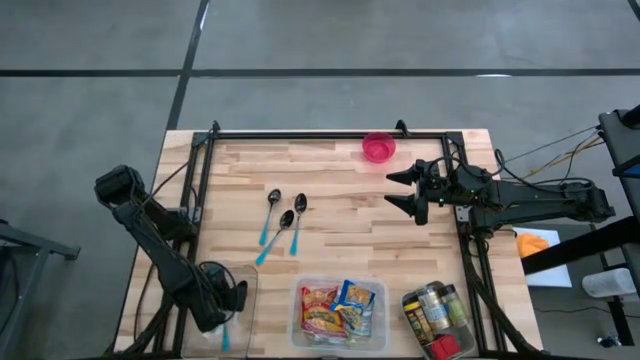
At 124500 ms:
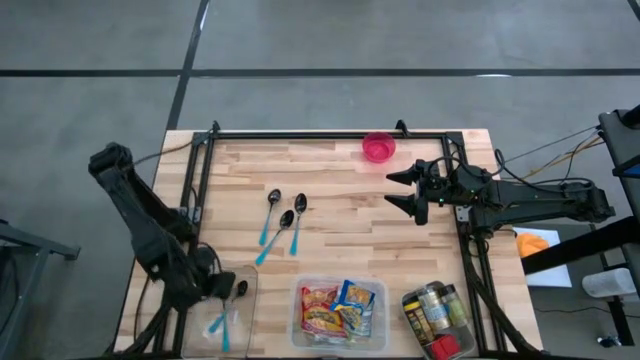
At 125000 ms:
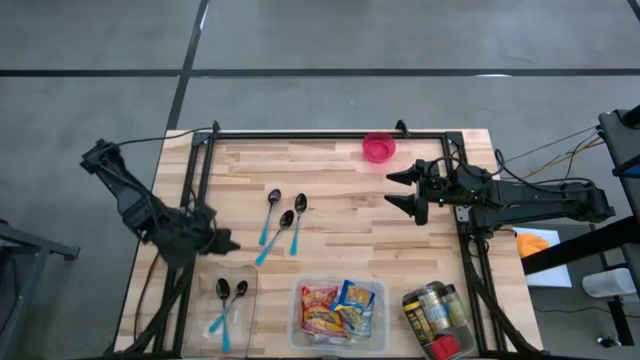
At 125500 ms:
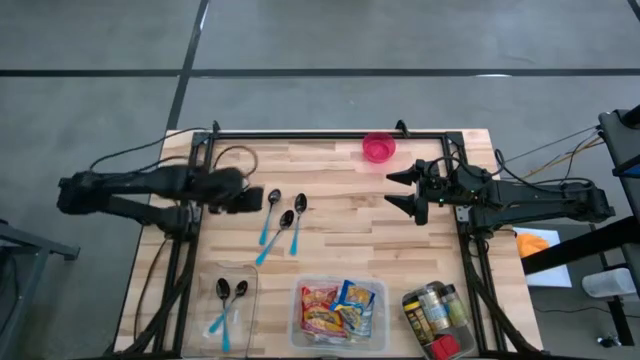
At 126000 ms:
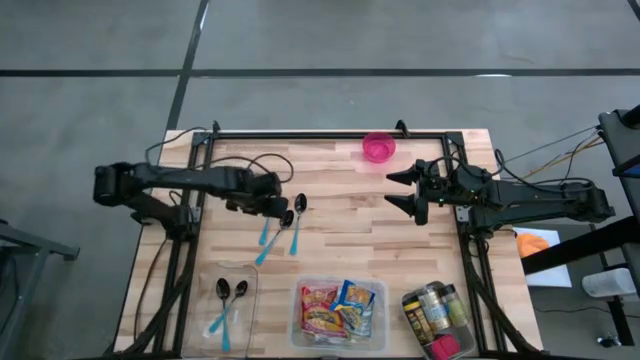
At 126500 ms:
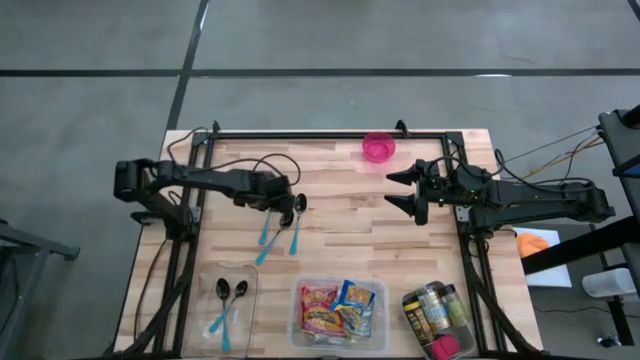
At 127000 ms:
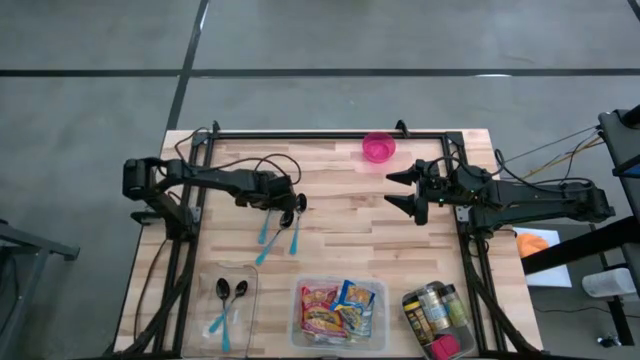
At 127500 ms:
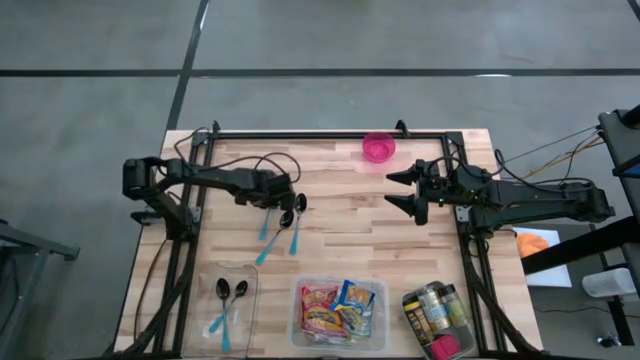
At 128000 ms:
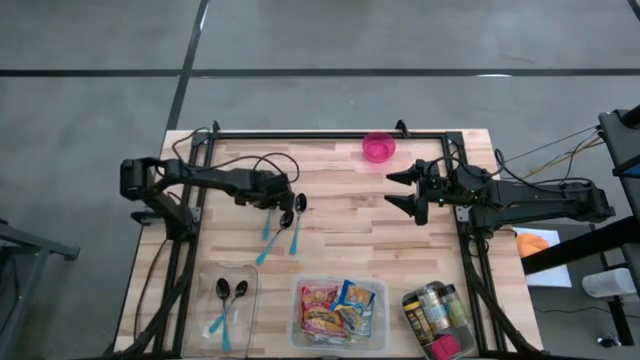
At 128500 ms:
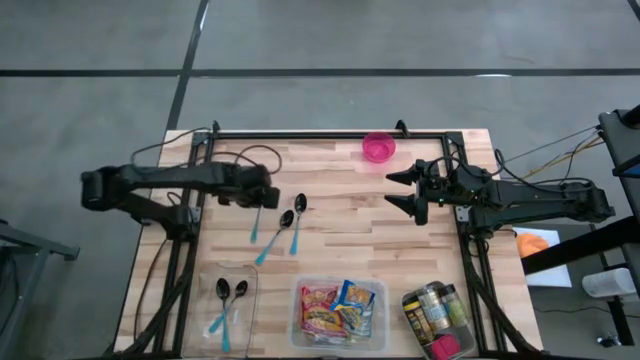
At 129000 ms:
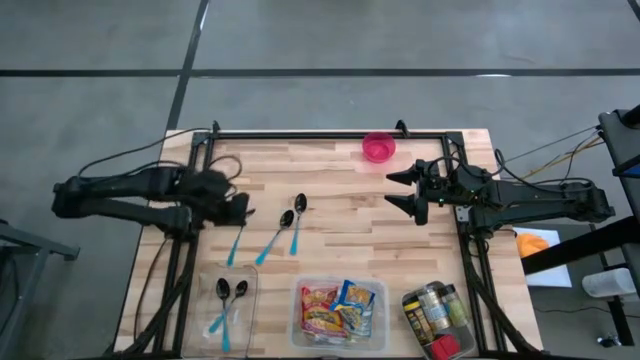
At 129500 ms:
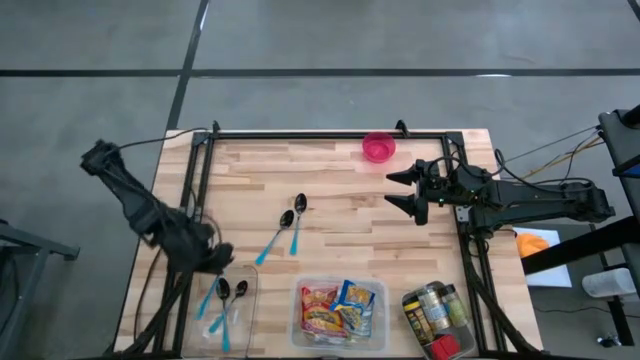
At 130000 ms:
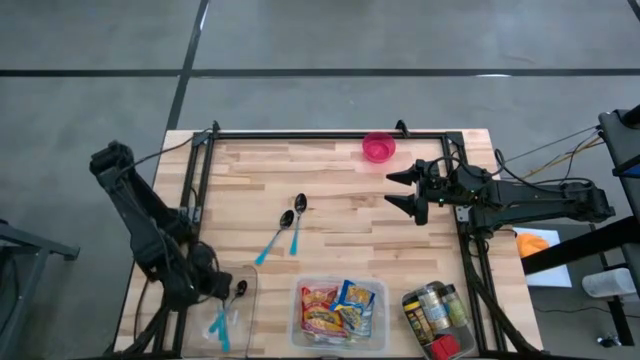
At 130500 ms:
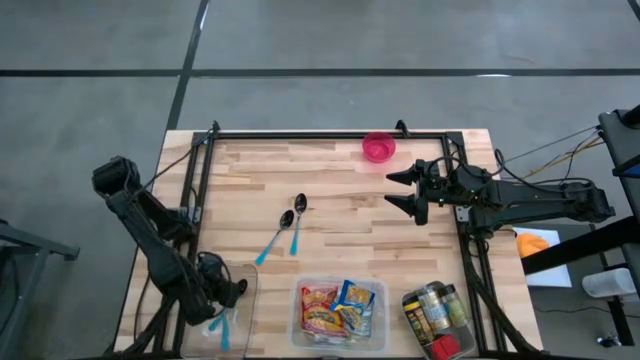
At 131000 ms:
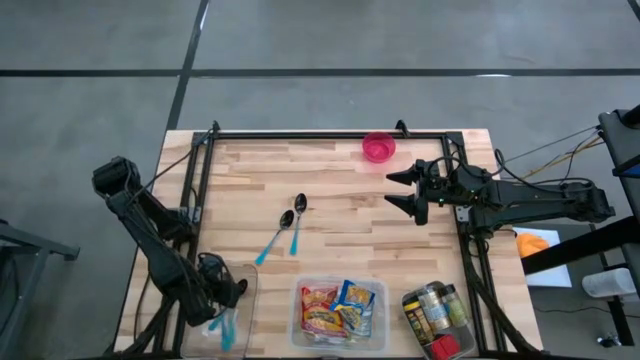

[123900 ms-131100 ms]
Put the left blue spoon into the transparent bin

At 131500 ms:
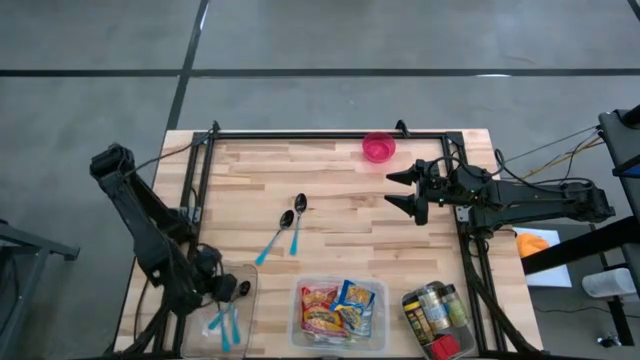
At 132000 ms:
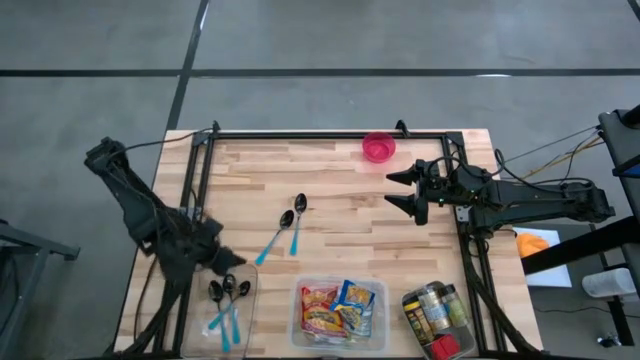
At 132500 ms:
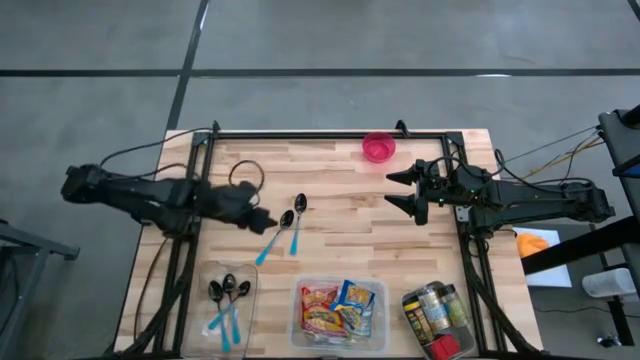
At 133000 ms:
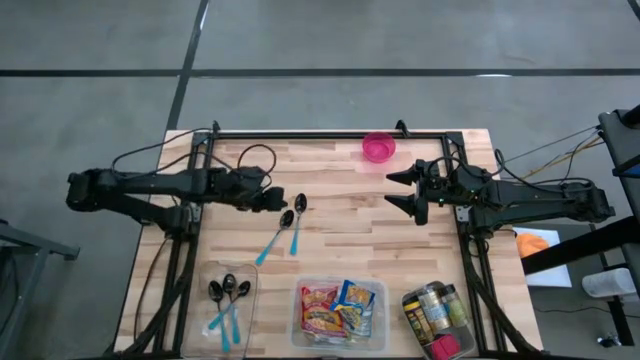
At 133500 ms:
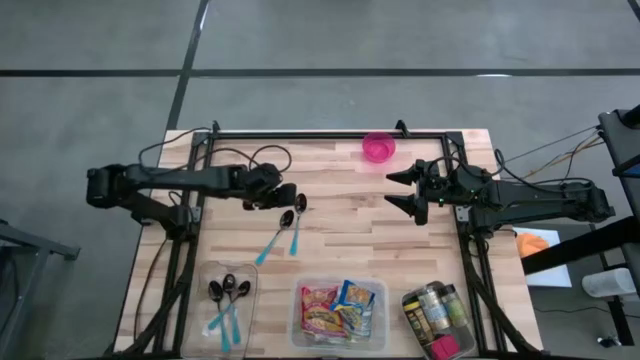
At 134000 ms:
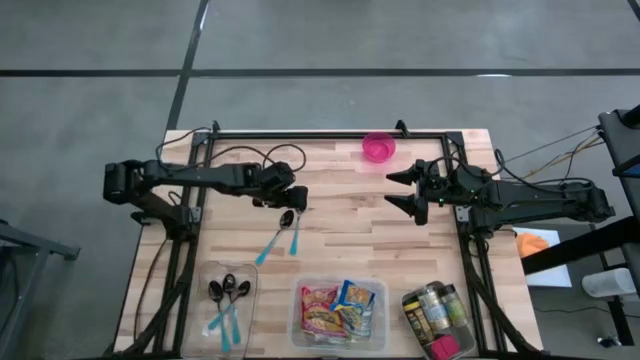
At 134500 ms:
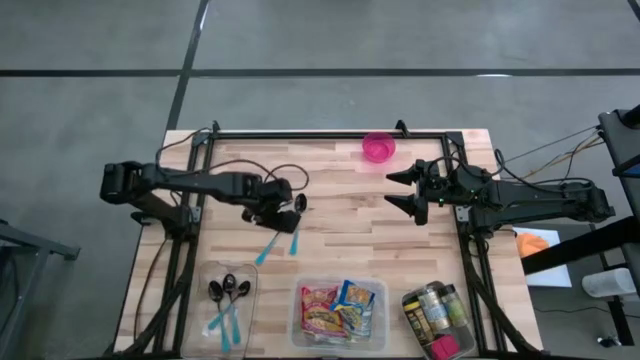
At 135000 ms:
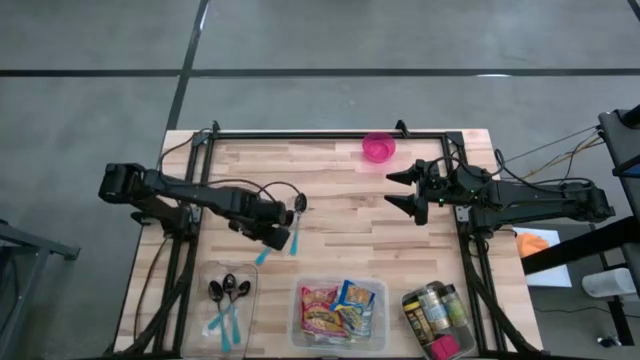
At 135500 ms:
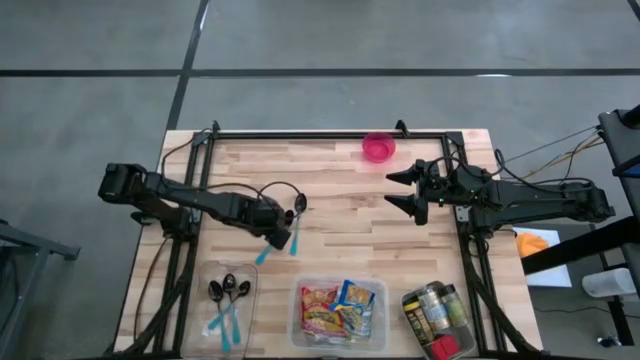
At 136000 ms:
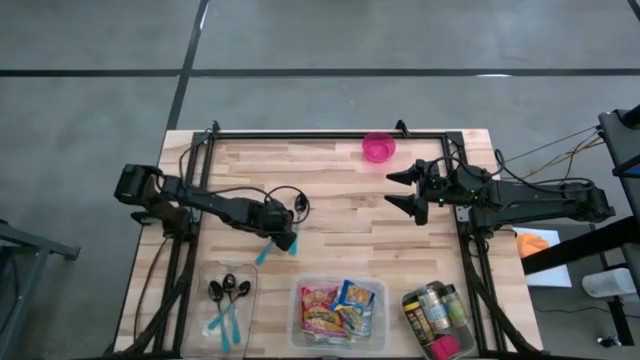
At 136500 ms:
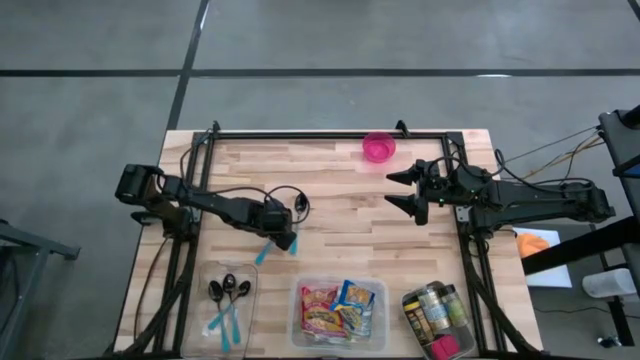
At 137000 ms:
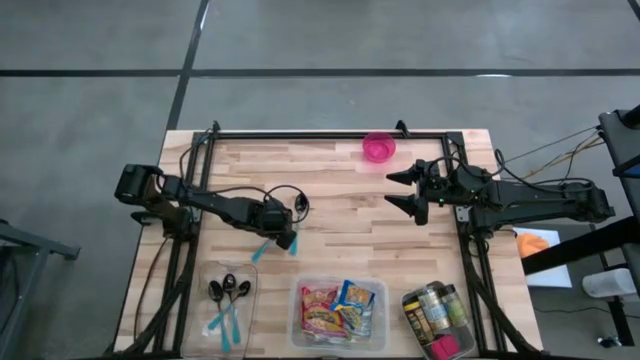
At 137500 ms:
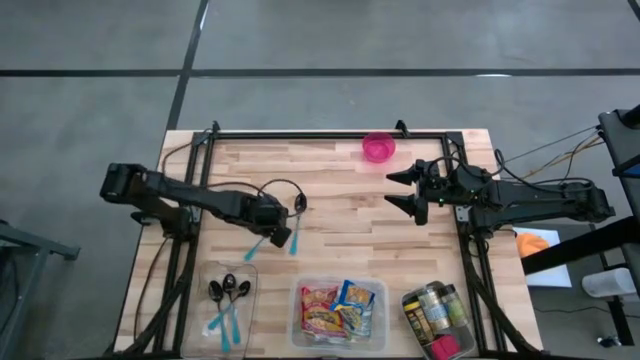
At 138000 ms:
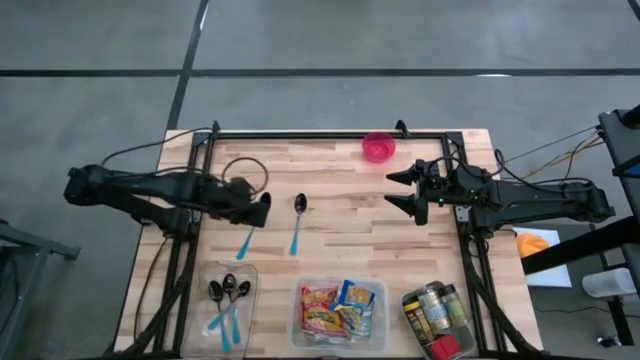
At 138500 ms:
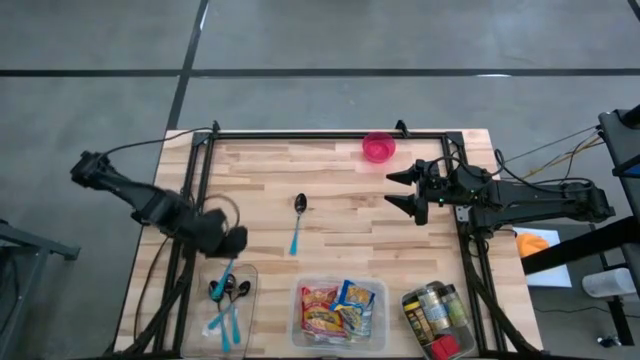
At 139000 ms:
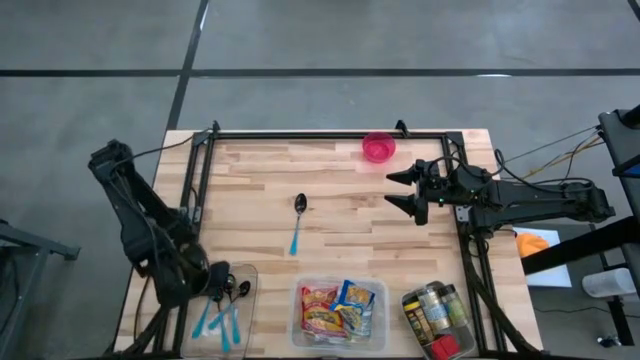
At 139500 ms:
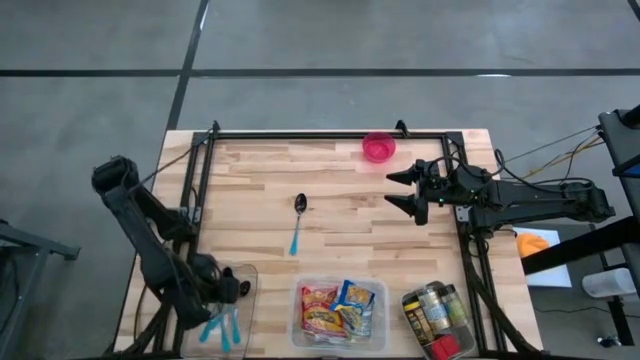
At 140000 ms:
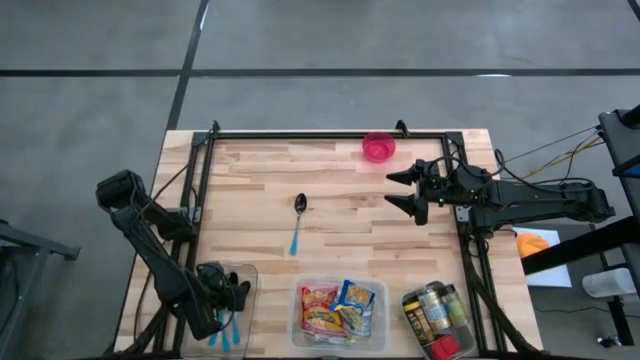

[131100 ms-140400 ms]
Put the left blue spoon into the transparent bin

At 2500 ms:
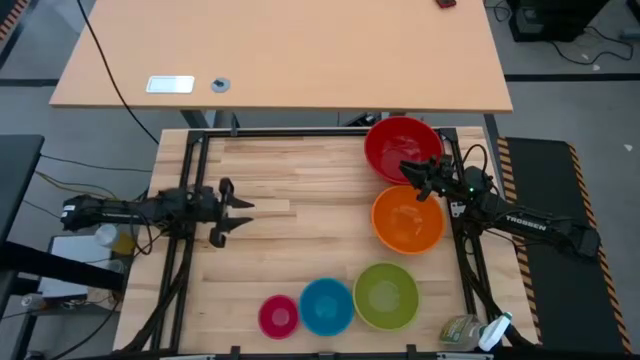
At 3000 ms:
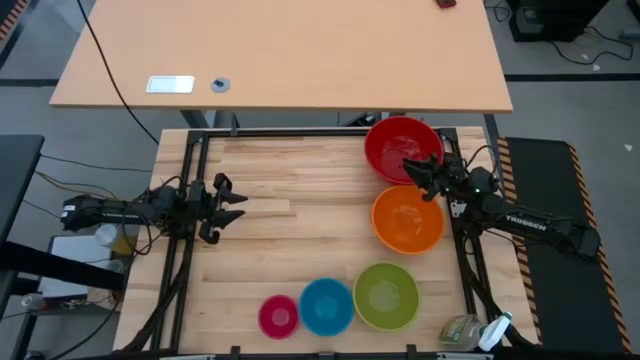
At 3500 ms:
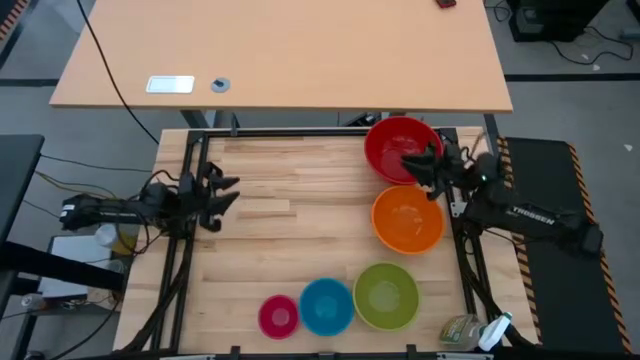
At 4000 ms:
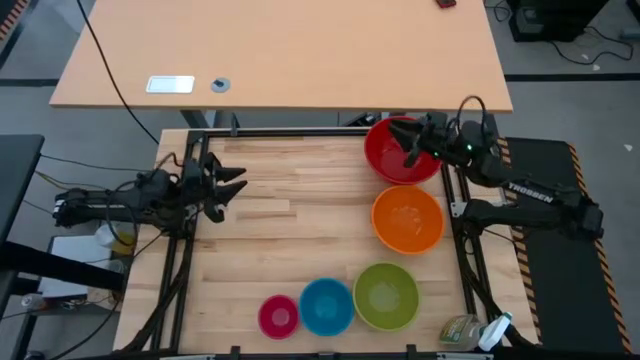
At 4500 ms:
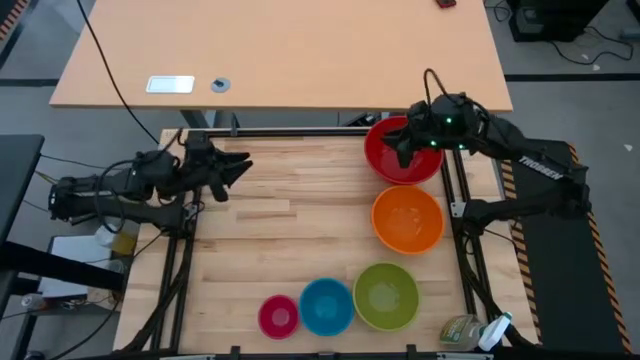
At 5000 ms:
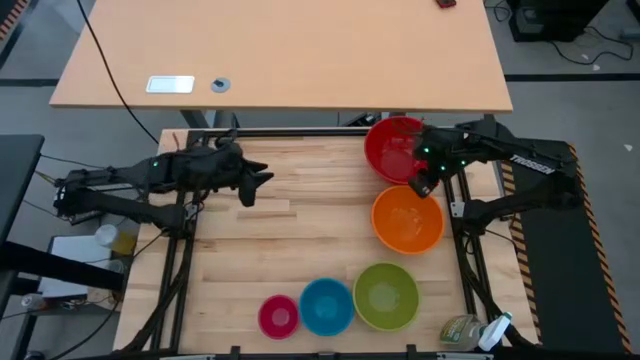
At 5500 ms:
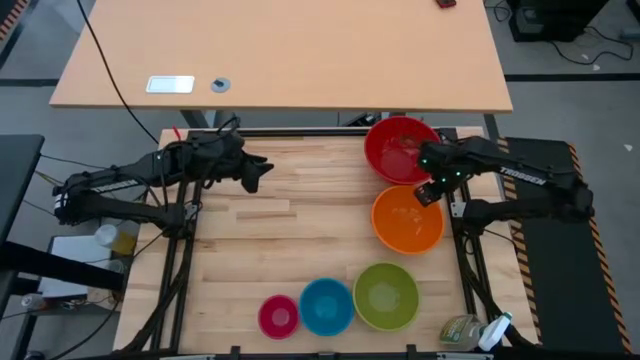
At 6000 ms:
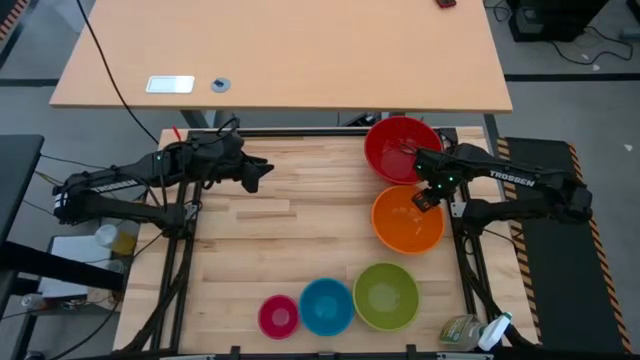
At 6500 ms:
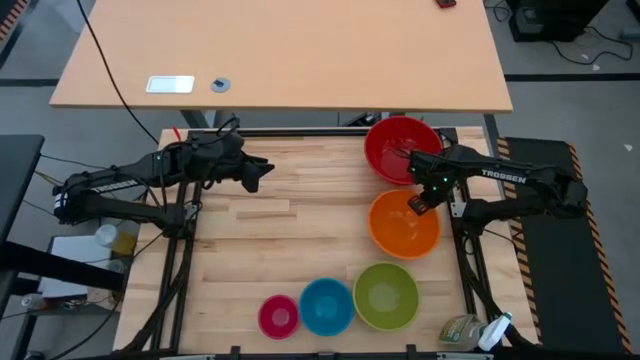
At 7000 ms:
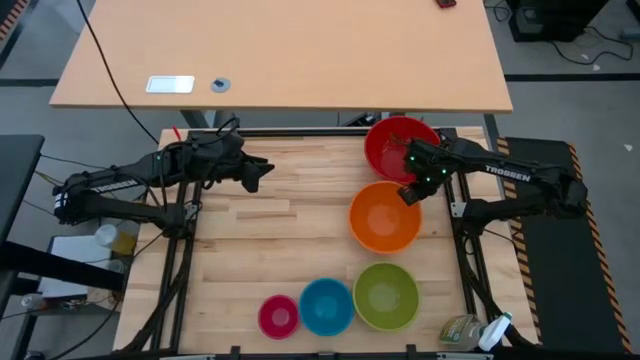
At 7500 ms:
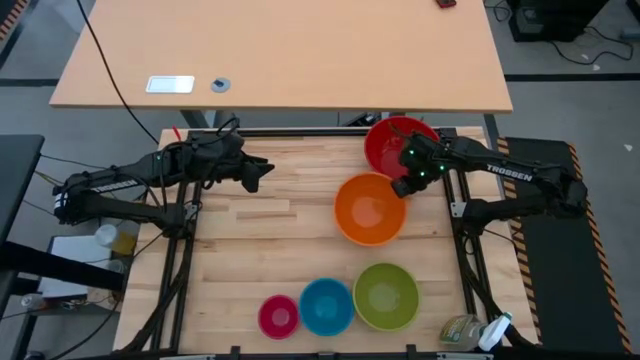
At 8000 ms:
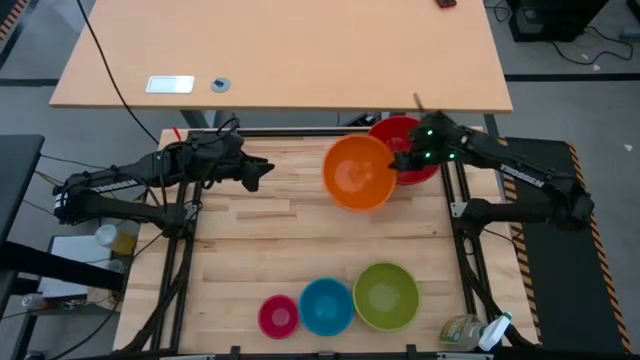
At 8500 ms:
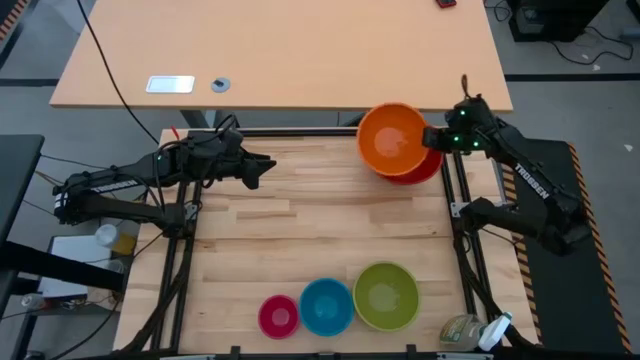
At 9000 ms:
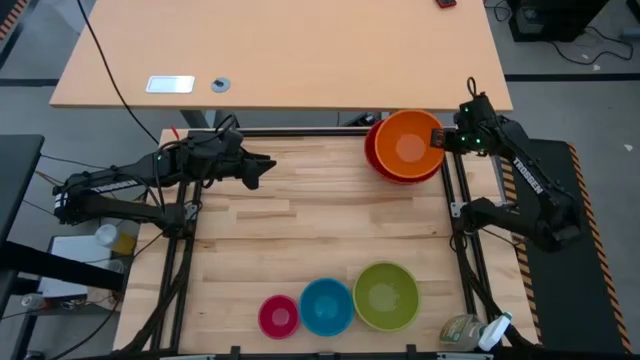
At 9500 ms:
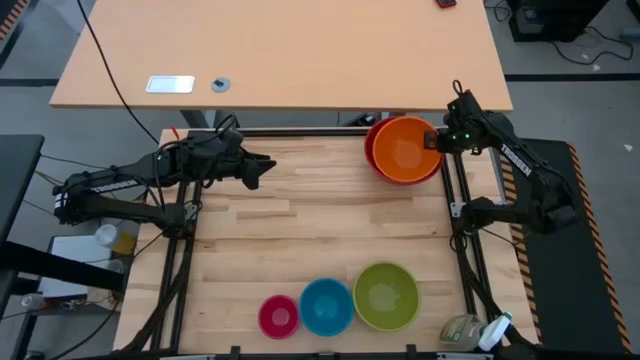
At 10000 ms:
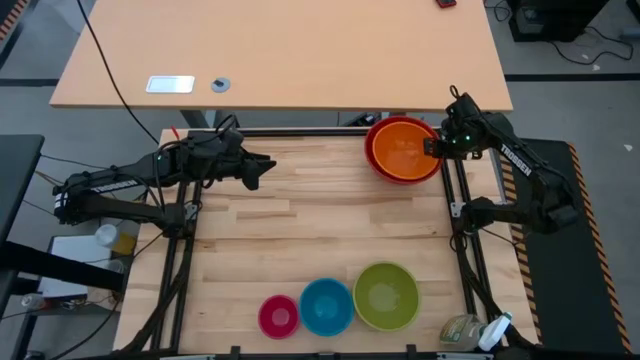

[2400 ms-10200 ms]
Stack the orange bowl on the red bowl
